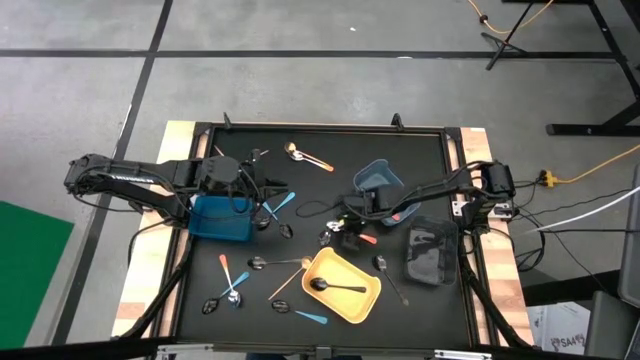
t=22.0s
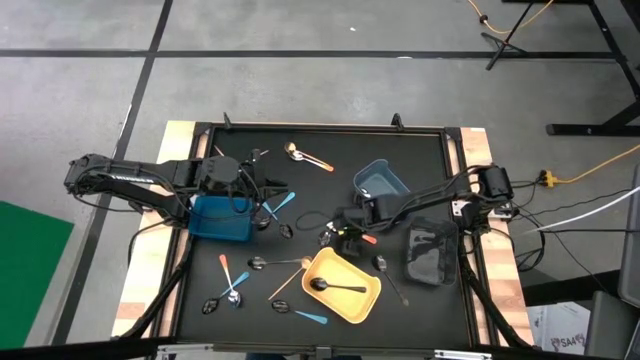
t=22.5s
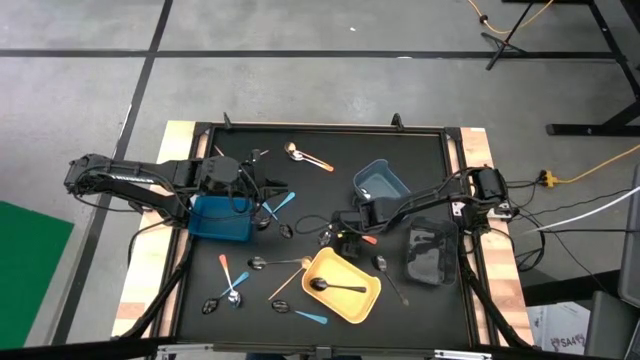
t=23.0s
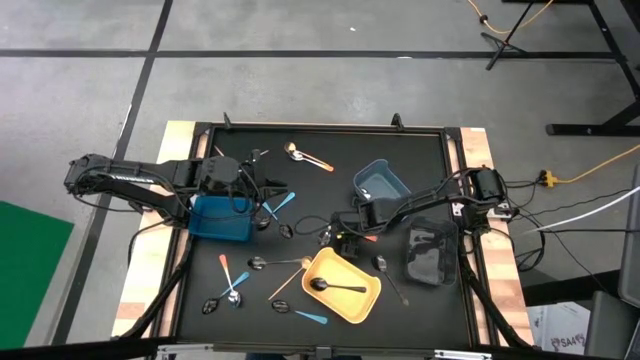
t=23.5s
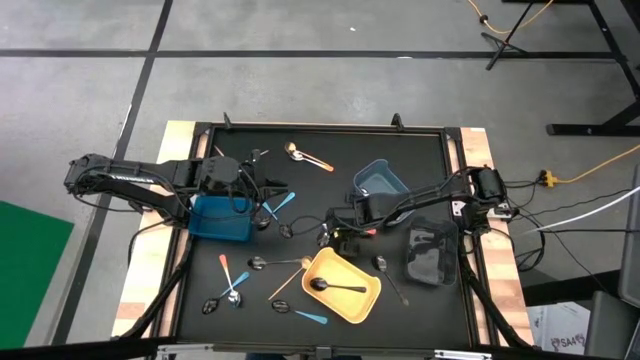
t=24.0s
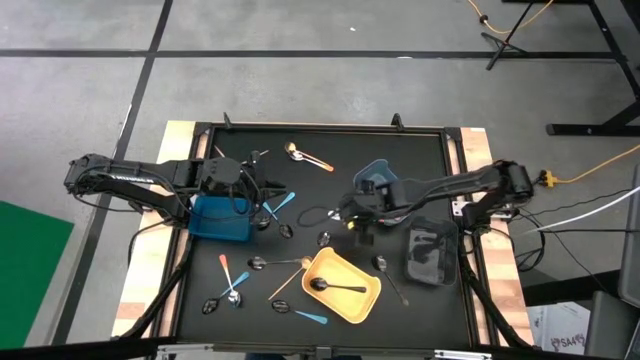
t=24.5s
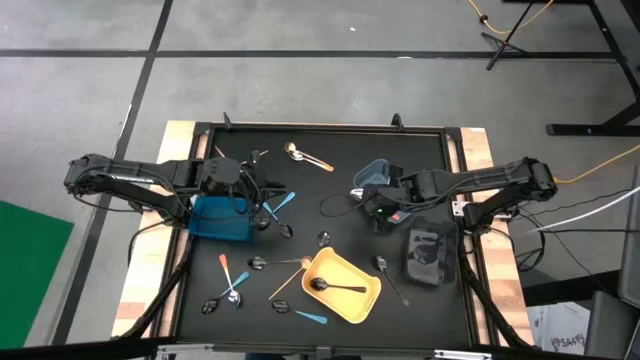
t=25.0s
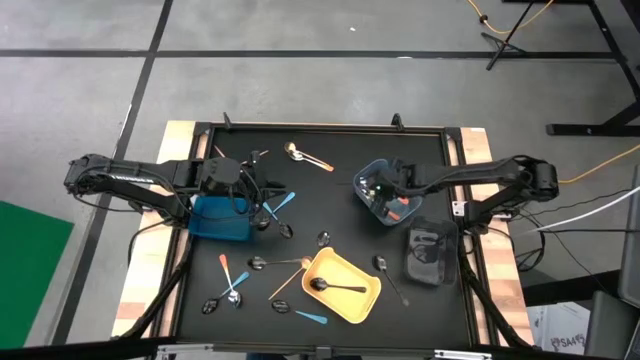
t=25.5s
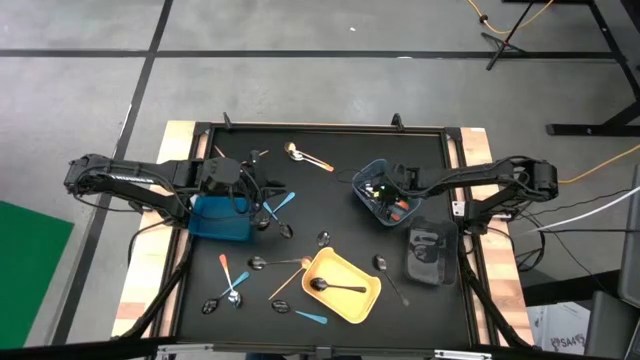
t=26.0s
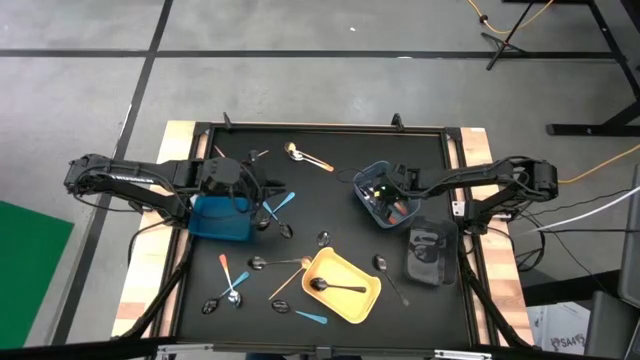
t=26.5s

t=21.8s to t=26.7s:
Task: Sort silverware by color (type)
Put the orange spoon into the gray bin

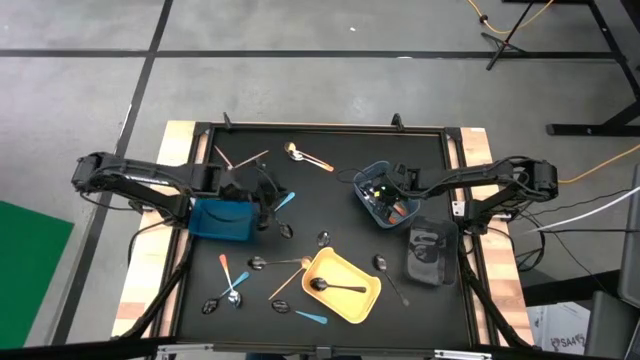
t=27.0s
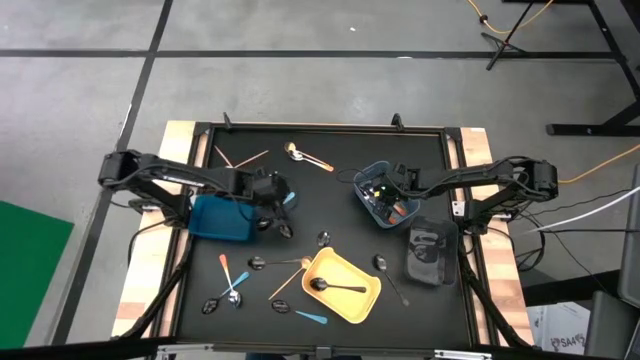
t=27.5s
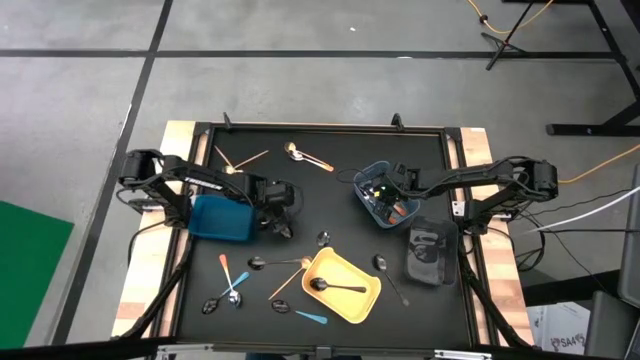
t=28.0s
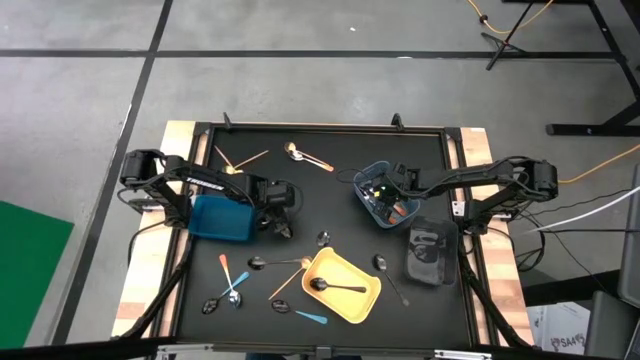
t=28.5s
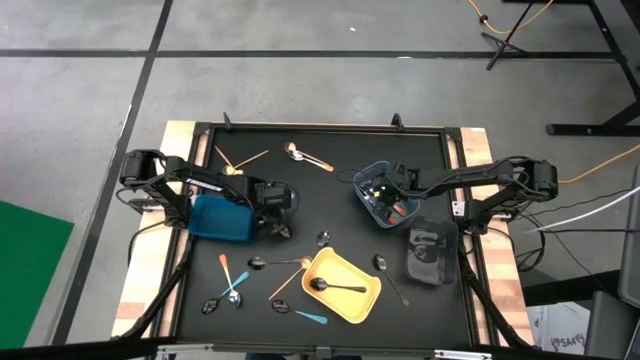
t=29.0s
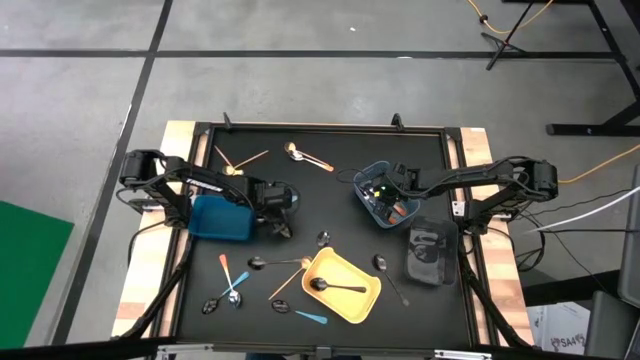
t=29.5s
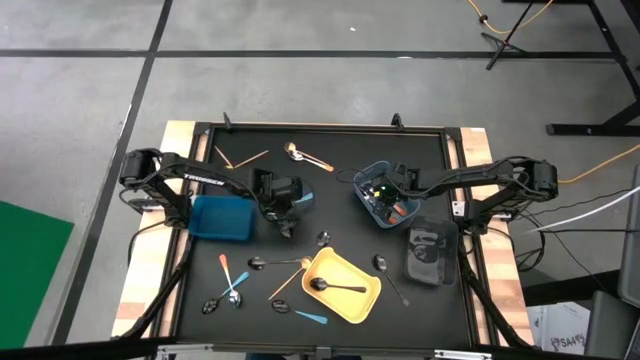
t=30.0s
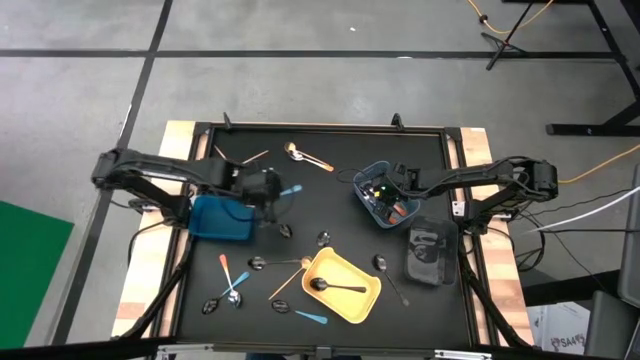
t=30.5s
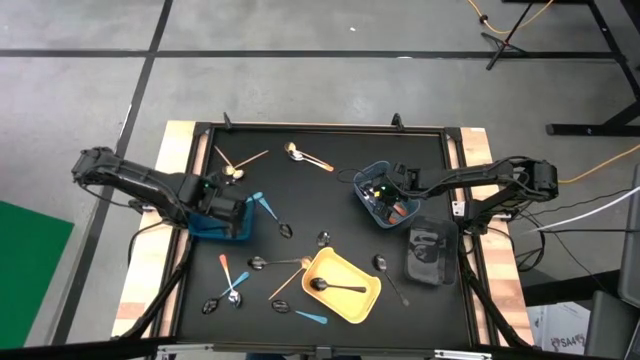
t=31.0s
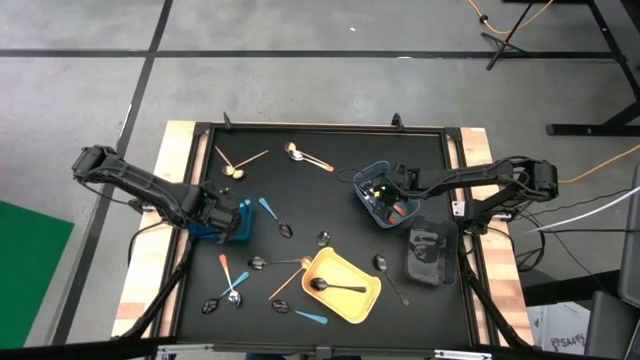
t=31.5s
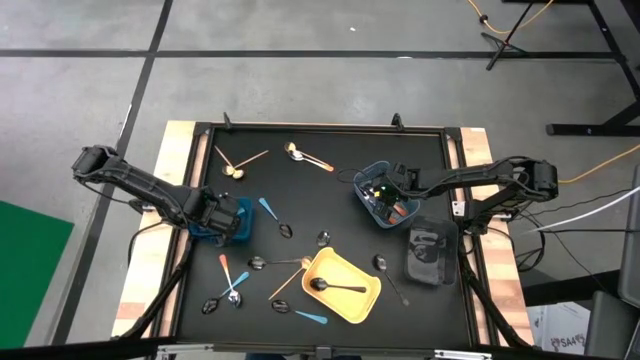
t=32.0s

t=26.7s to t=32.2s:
Put the blue spoon into the blue bin

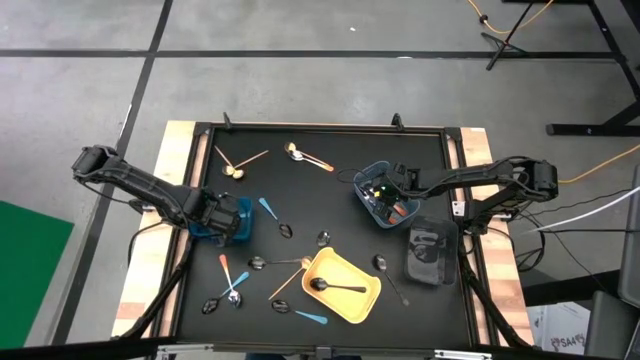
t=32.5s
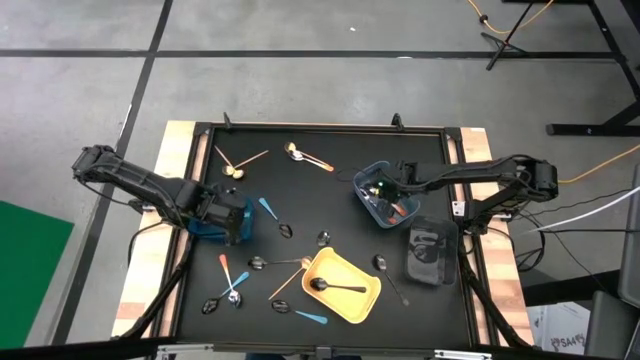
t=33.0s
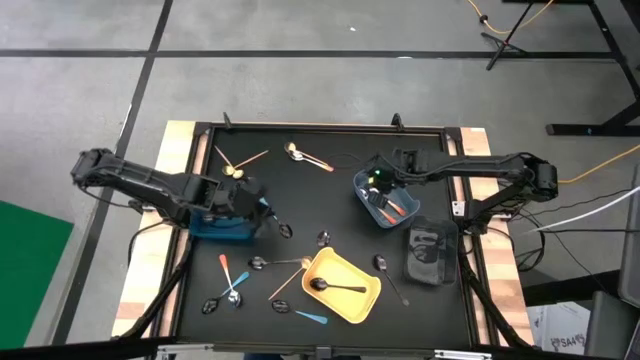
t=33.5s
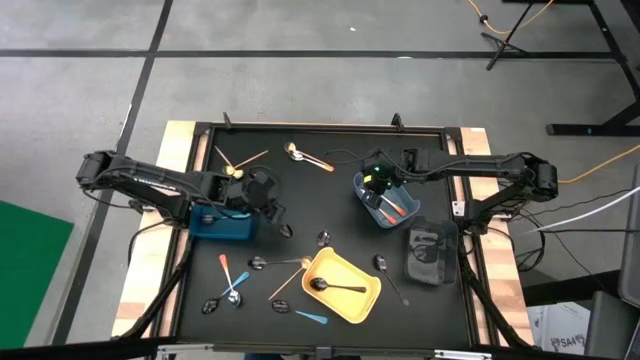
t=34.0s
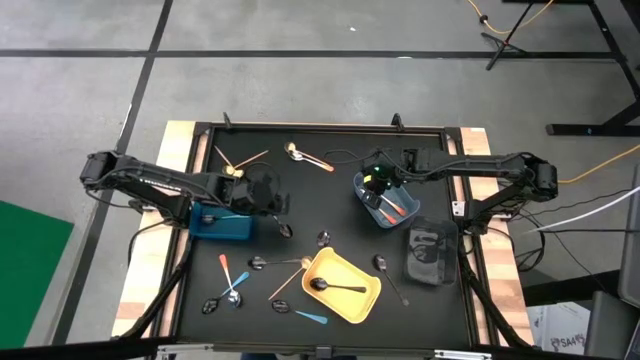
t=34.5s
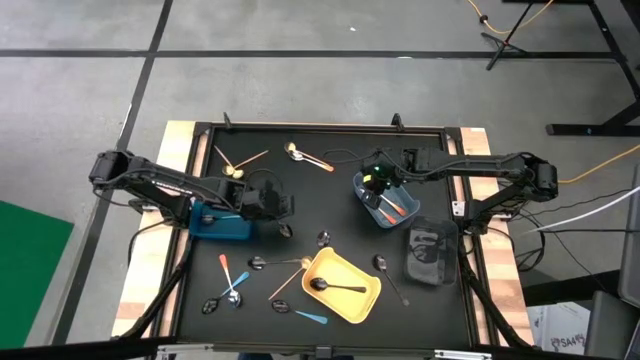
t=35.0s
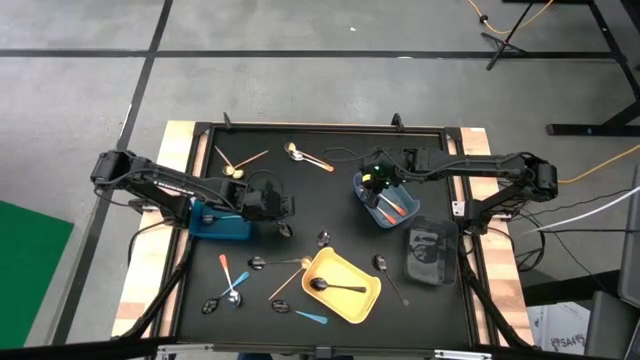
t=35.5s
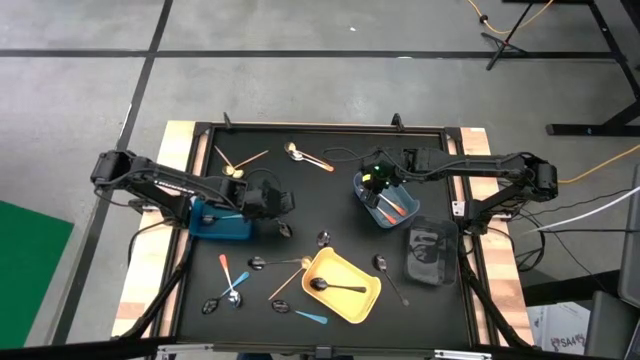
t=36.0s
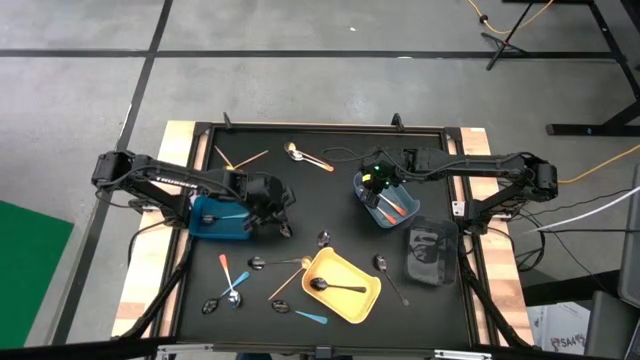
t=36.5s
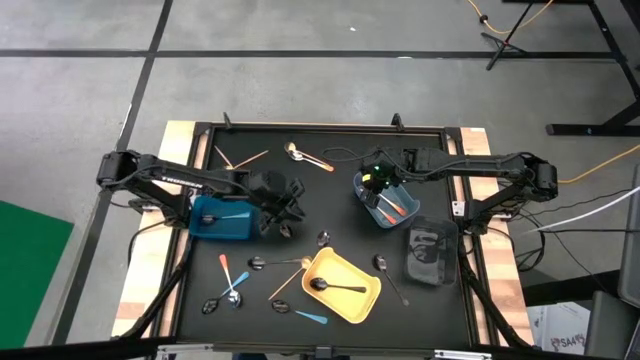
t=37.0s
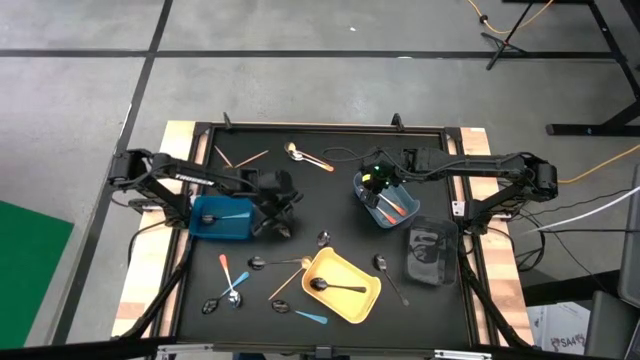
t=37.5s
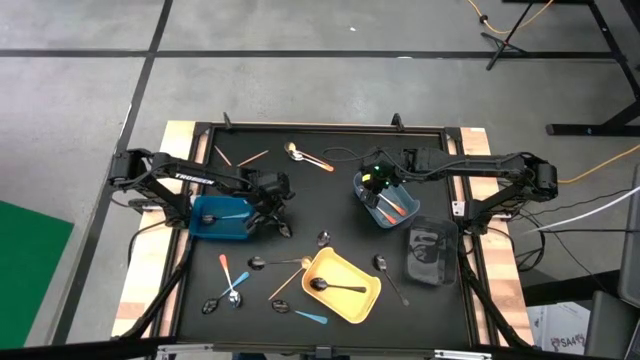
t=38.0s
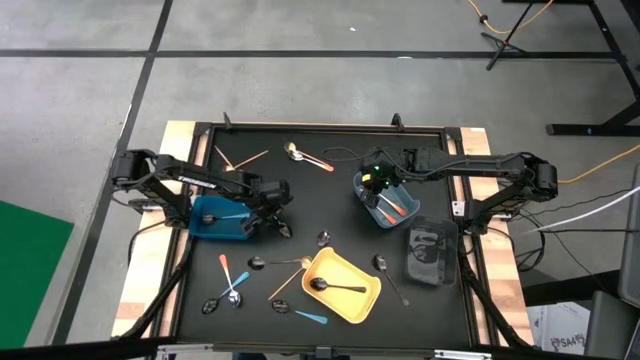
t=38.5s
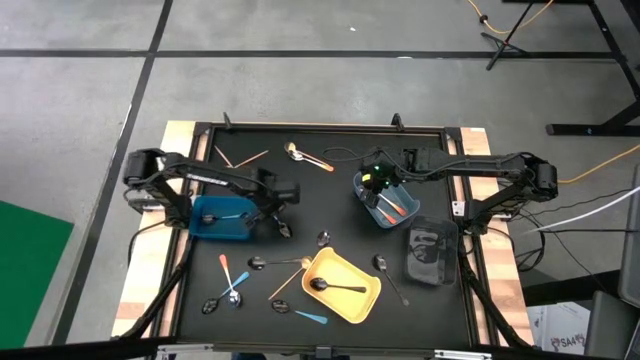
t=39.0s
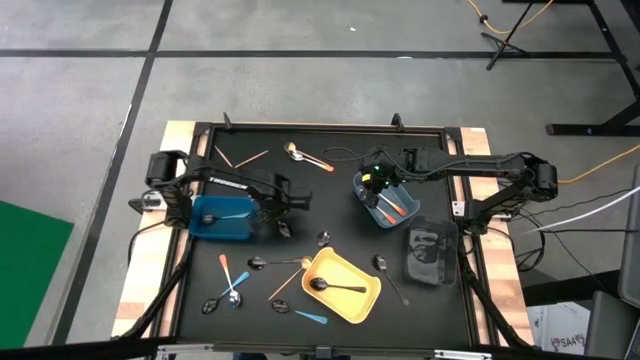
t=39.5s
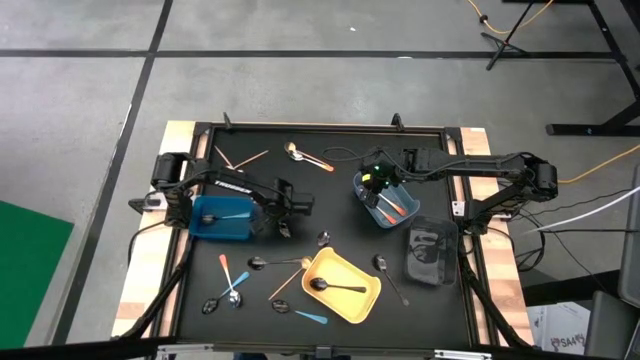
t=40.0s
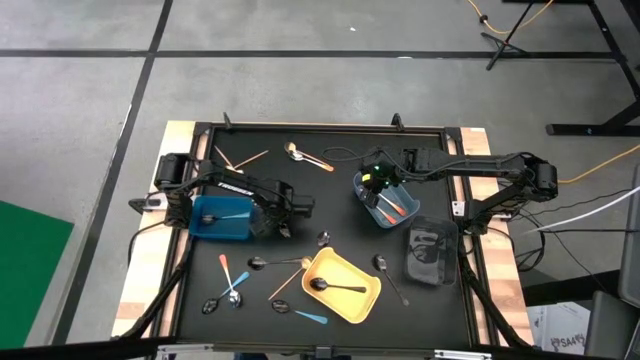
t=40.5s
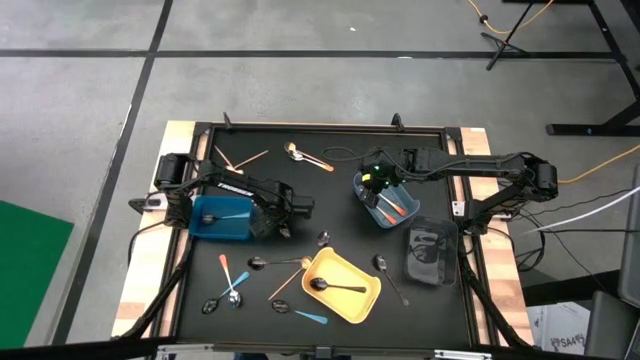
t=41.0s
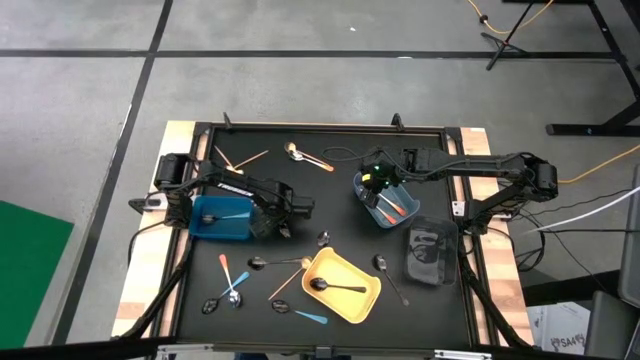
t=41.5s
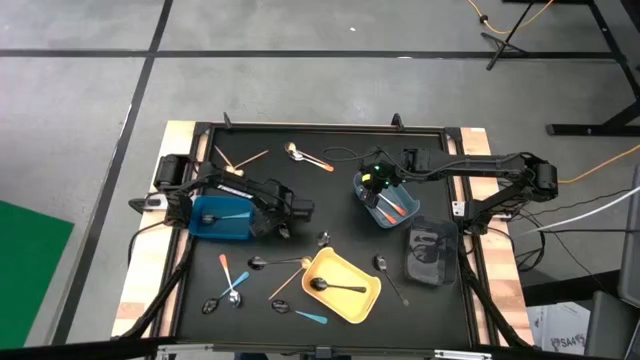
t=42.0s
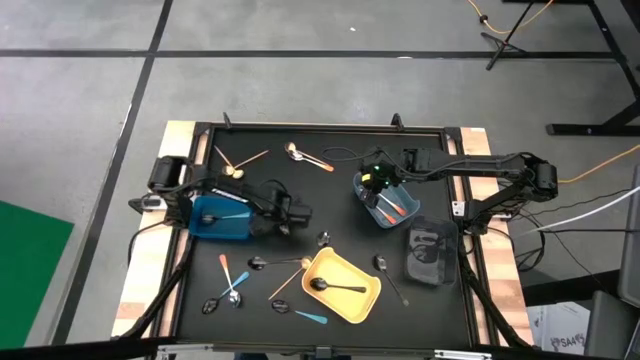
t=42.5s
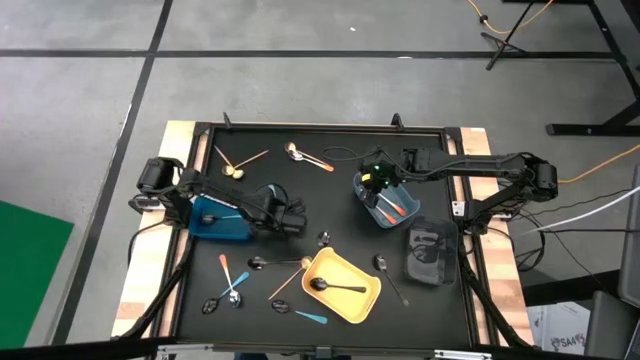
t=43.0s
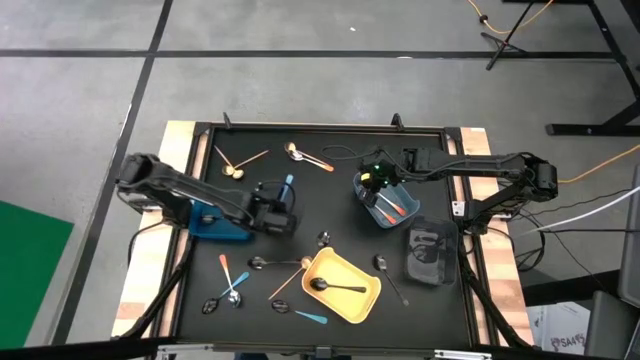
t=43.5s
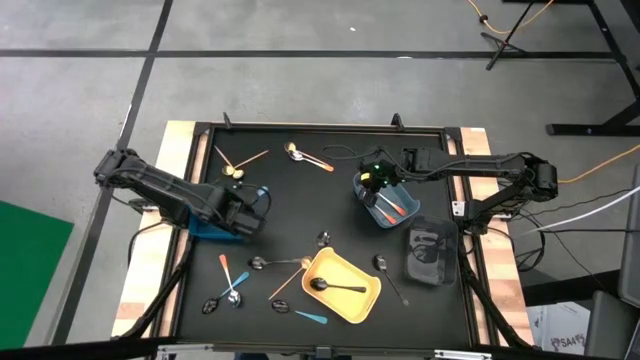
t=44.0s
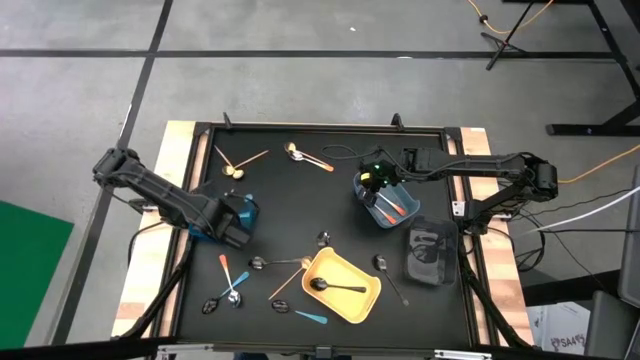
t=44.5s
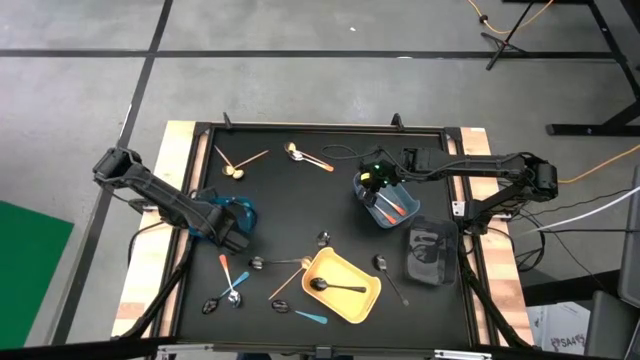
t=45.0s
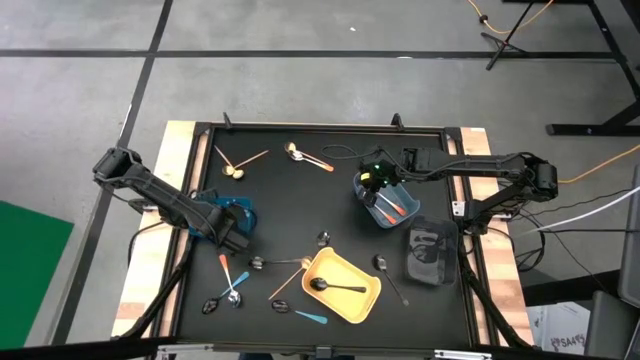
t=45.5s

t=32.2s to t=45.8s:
Put the blue spoon into the blue bin
